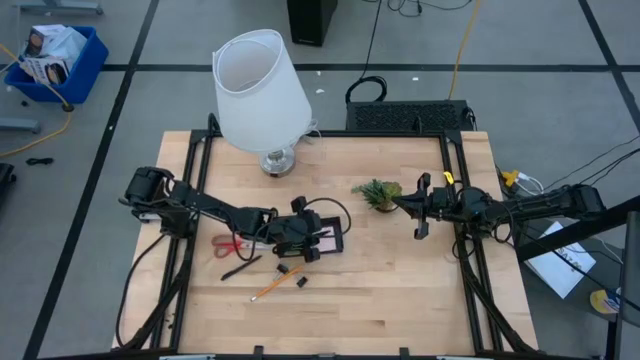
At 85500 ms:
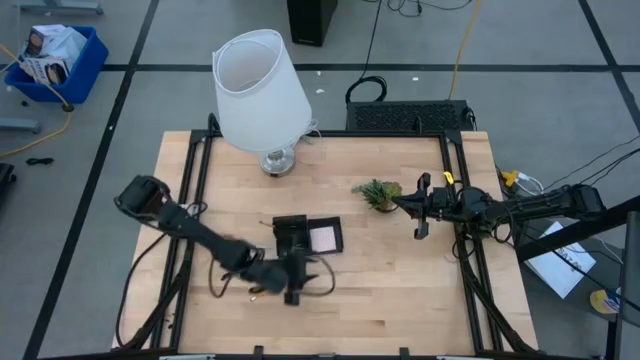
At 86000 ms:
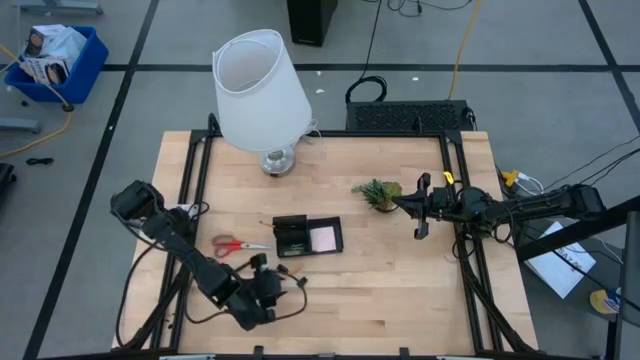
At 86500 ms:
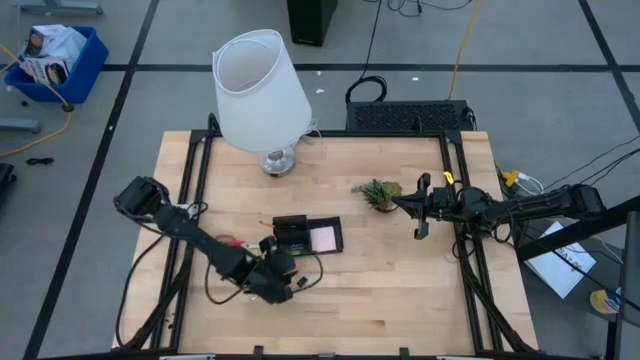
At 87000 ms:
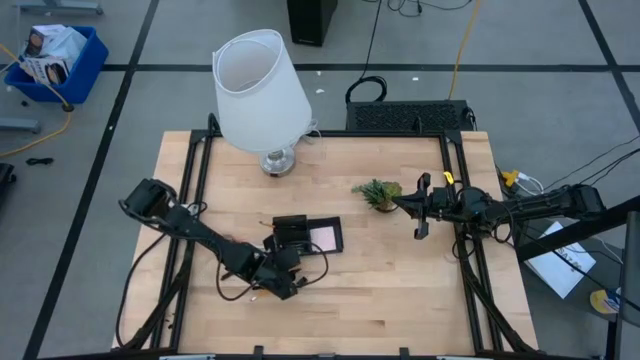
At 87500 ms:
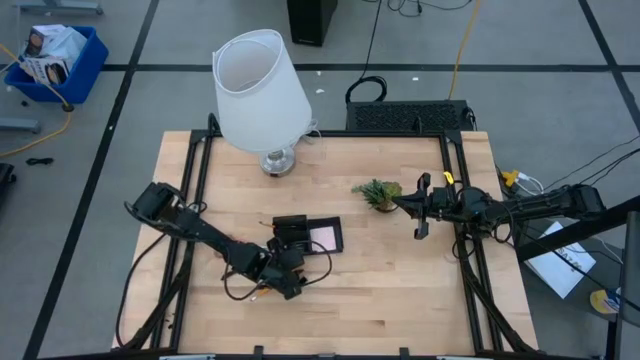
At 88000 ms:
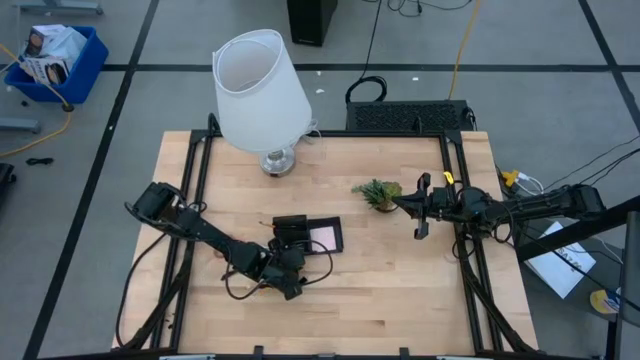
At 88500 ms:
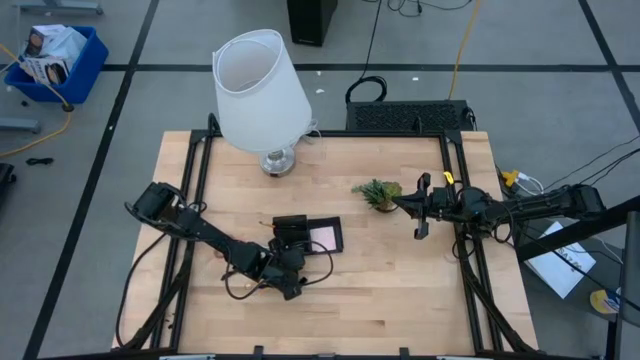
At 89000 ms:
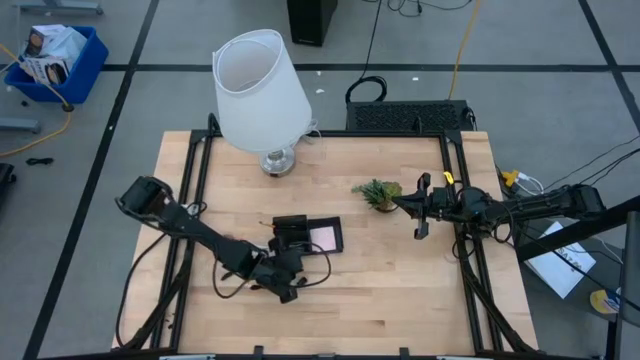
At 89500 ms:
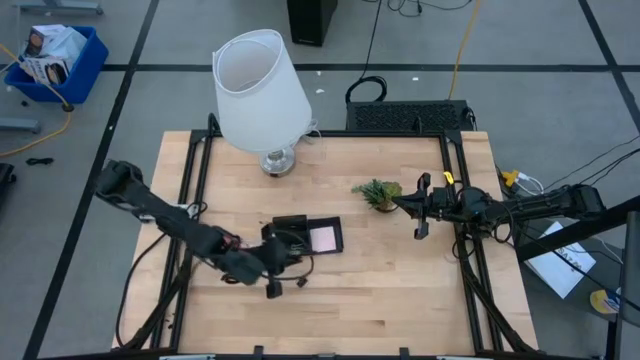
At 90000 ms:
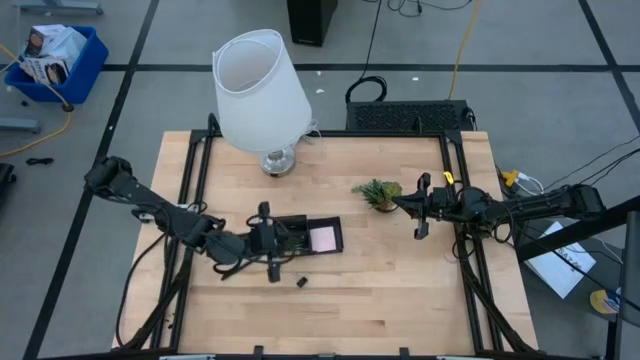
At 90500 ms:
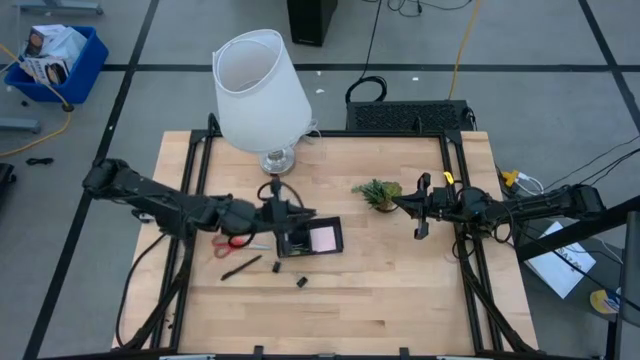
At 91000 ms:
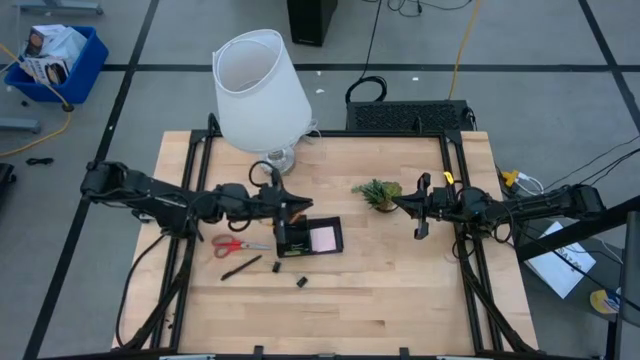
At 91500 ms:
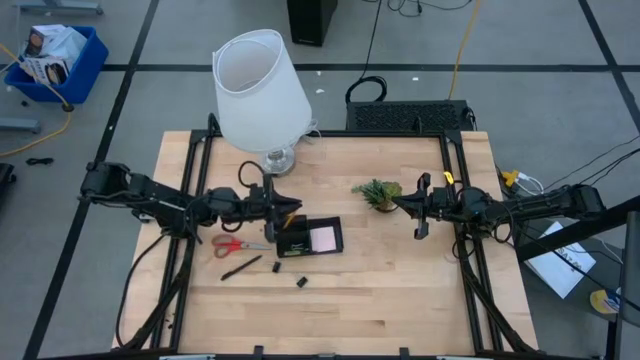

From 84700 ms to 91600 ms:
Task: Pick and place office supplies into organizer
Put the orange pencil into the black desk organizer

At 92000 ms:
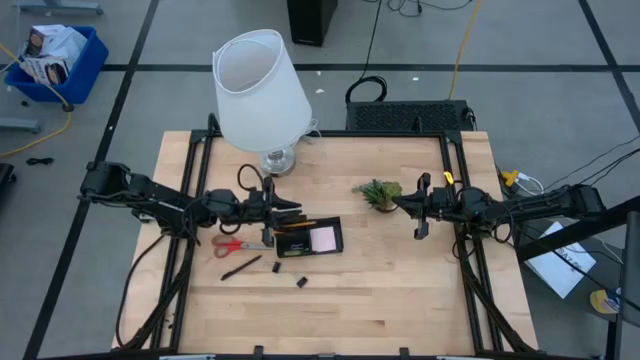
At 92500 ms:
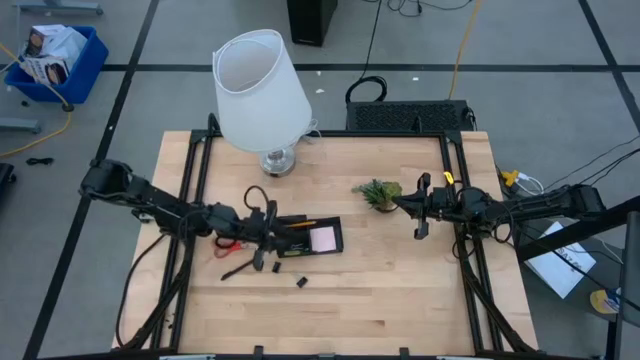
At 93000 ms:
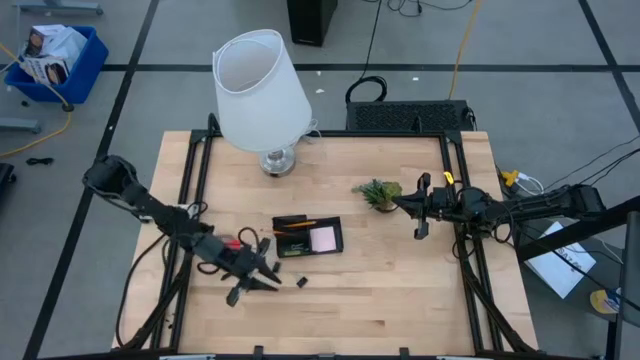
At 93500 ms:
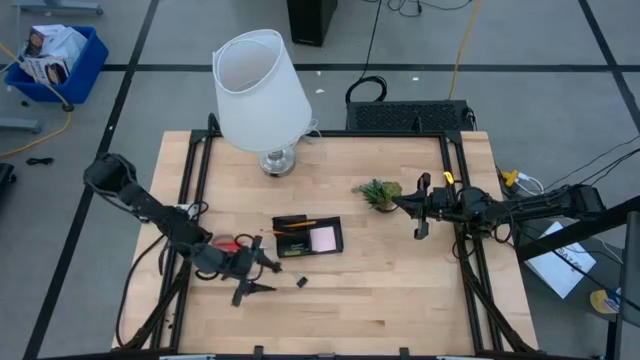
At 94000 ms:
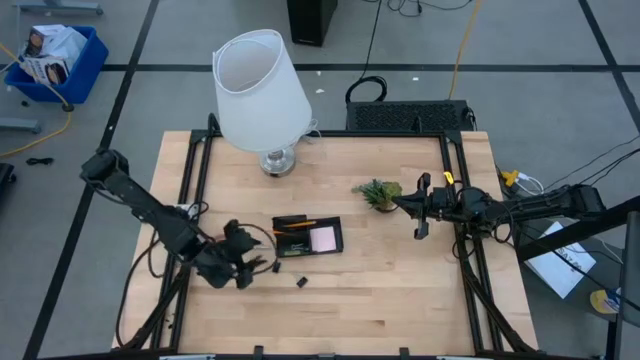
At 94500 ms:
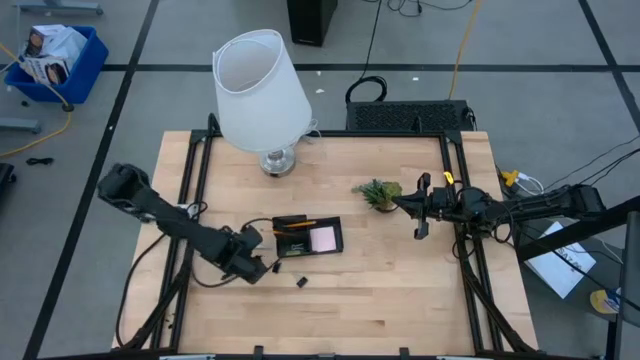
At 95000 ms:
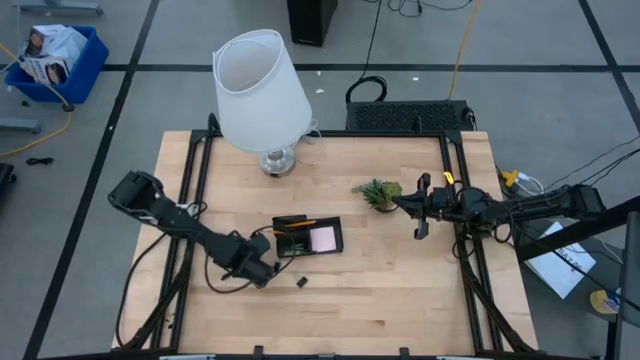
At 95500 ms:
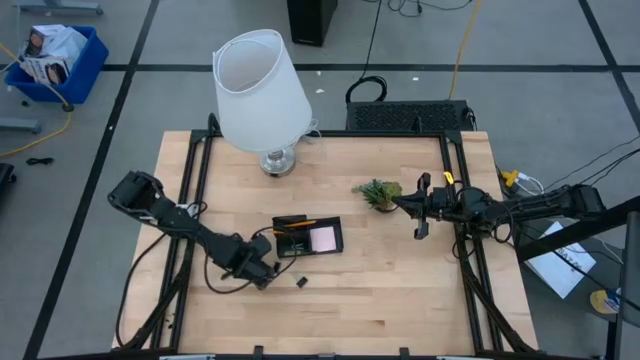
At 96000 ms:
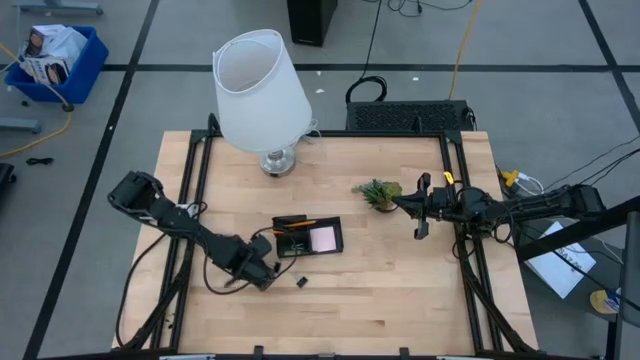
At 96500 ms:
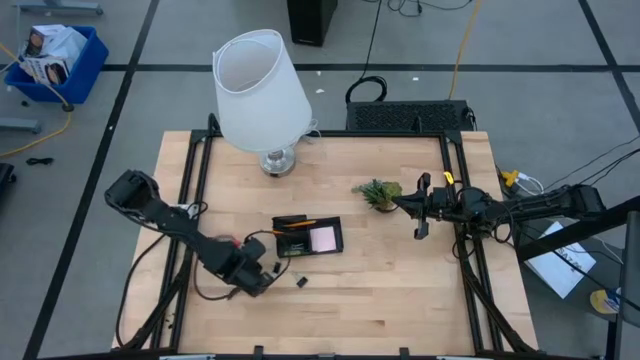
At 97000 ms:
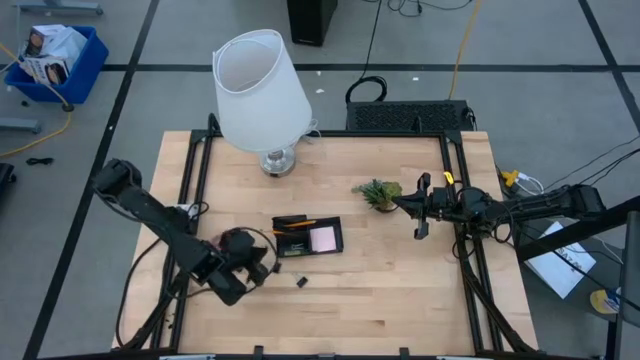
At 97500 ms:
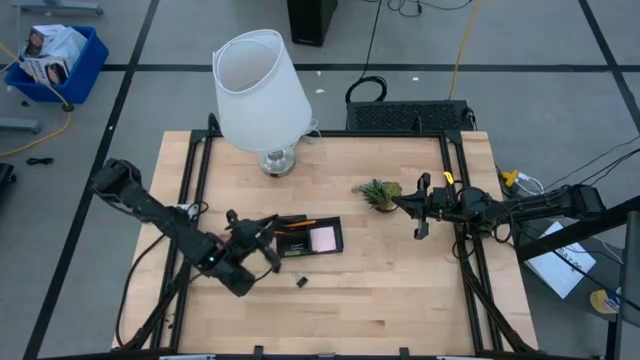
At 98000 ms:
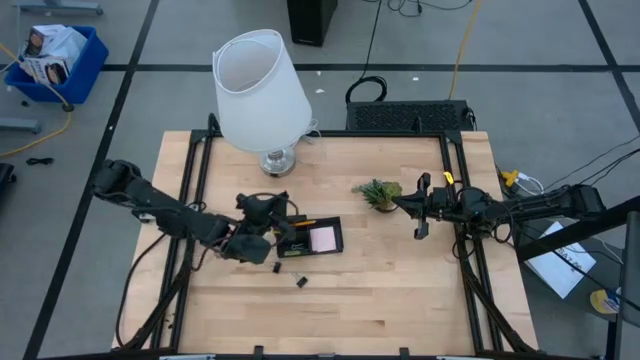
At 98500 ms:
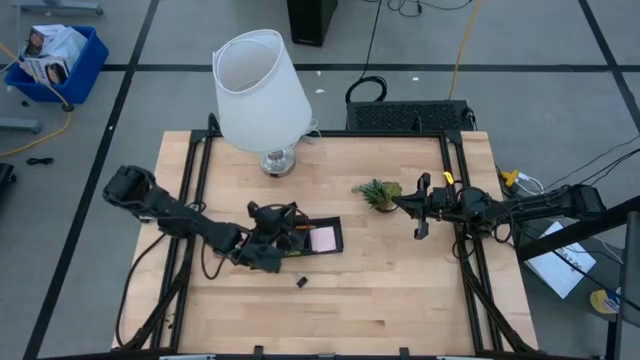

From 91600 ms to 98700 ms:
Put the black pen into the black desk organizer

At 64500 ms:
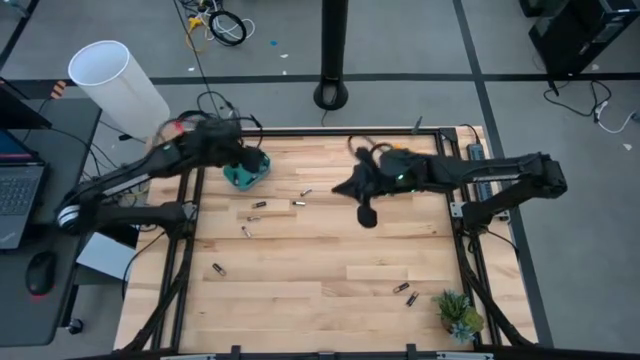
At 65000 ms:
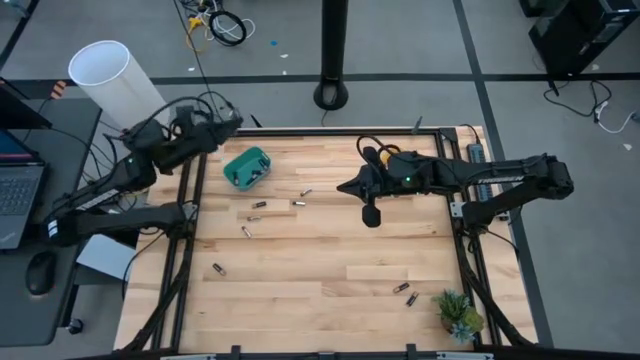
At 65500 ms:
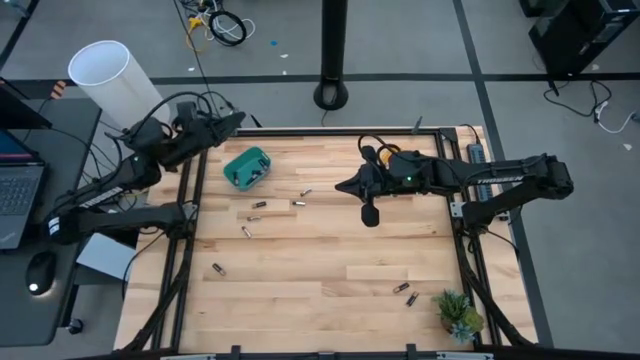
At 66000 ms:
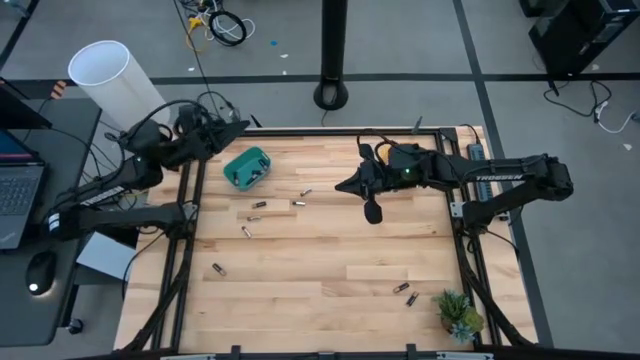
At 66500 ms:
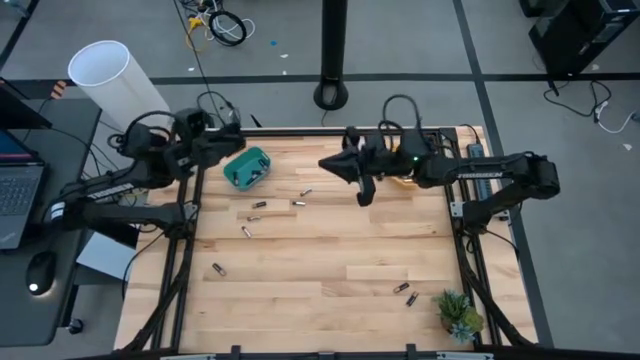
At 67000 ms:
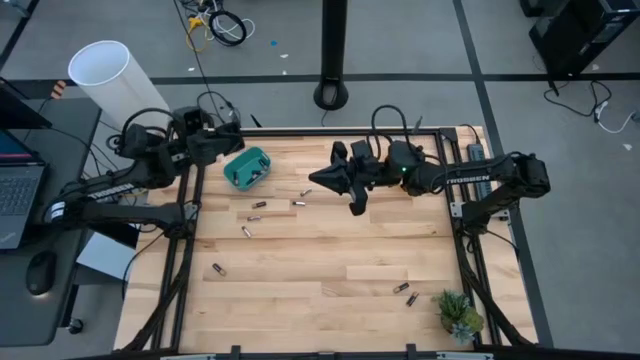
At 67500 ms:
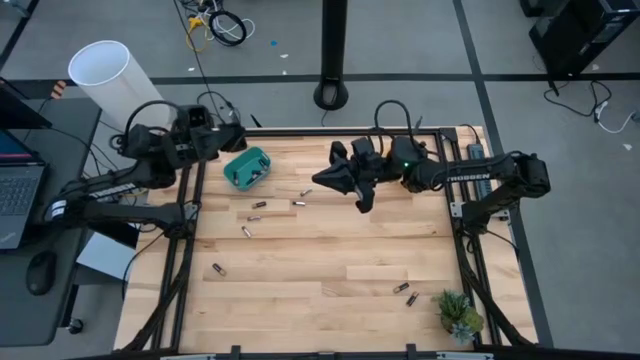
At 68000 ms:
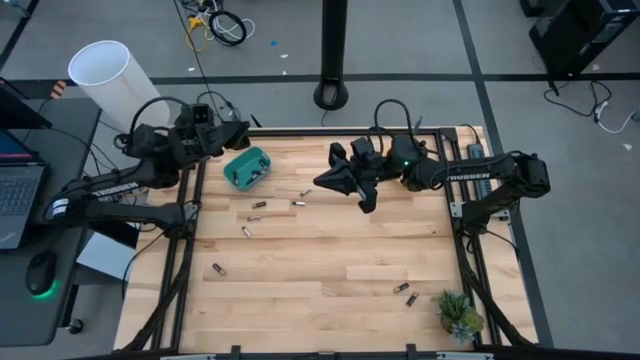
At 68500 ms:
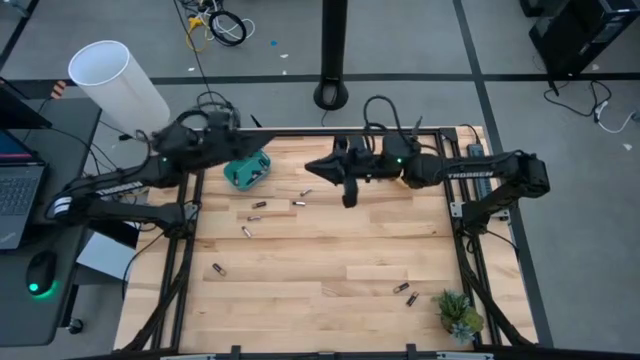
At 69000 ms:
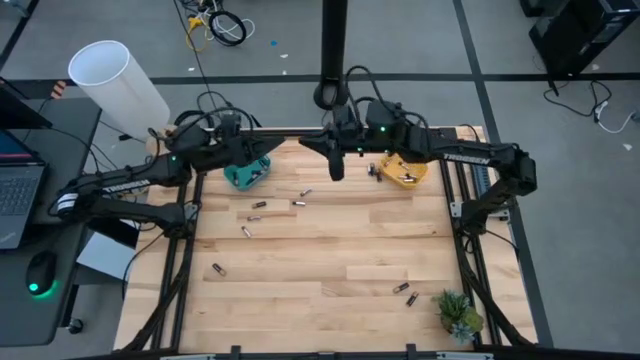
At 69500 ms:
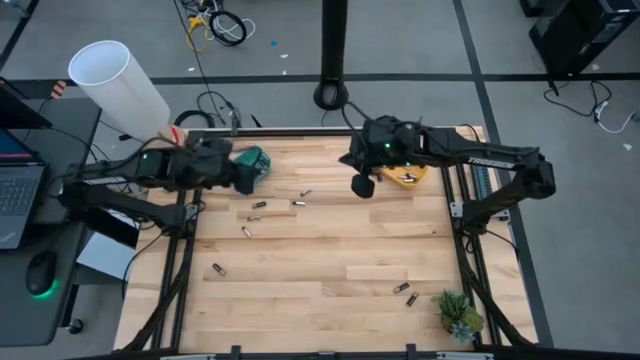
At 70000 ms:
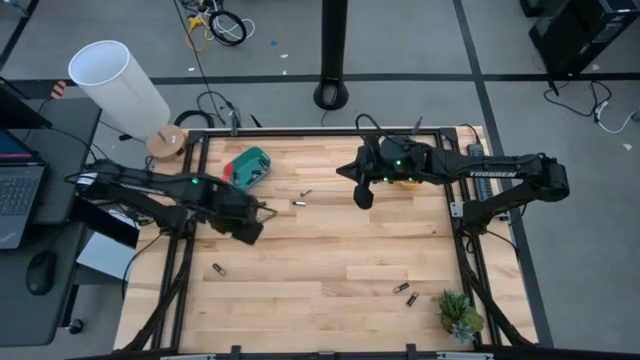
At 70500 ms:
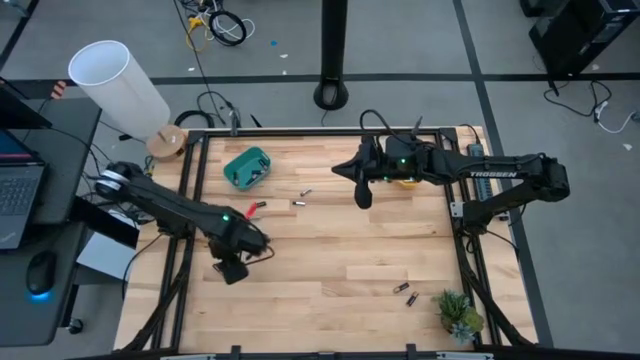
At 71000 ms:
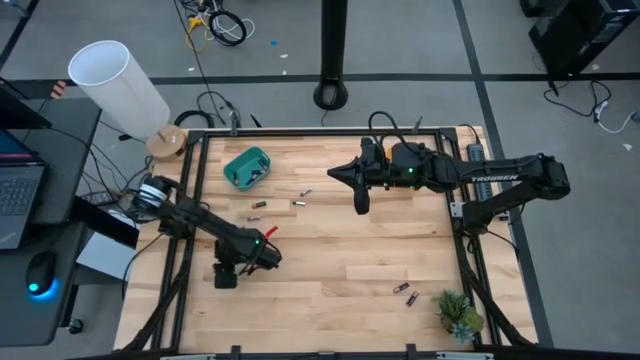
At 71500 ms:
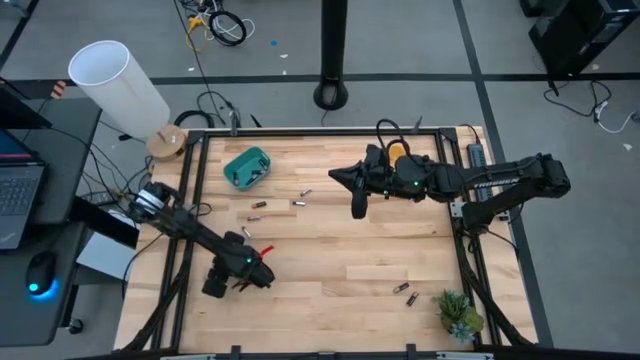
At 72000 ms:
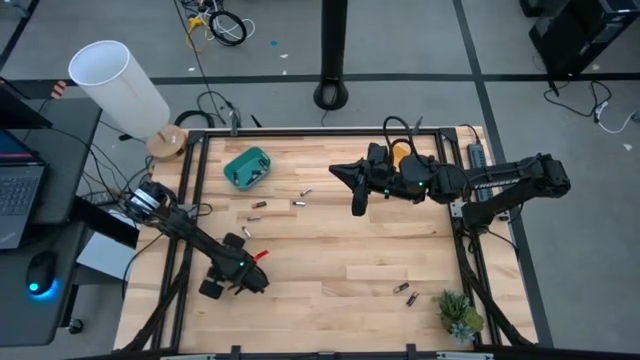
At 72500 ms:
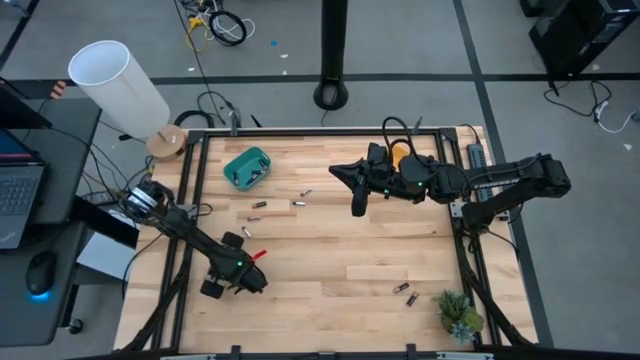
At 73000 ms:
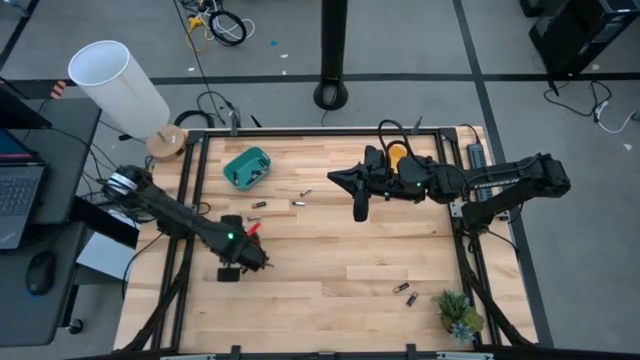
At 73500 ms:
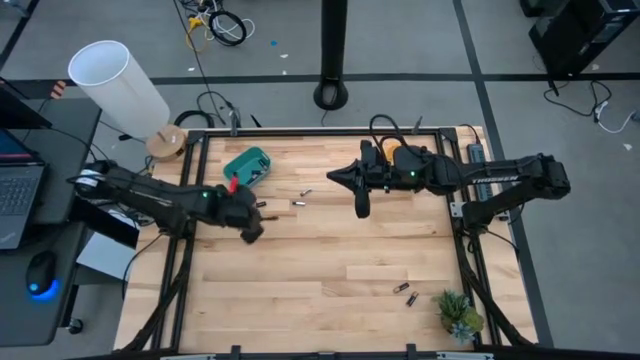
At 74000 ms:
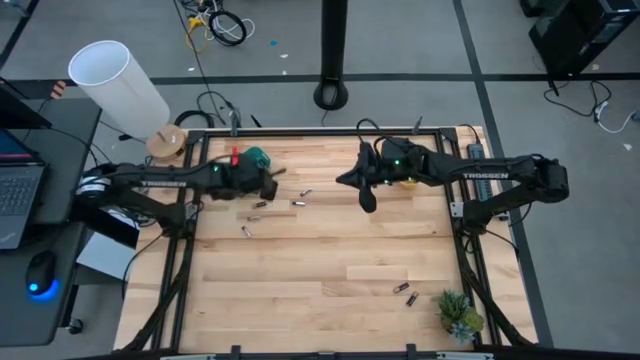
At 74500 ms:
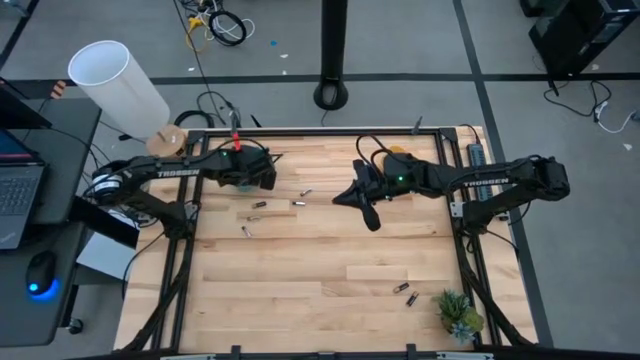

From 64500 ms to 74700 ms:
Task: Sort batteries
Put the black battery into the blue bin
